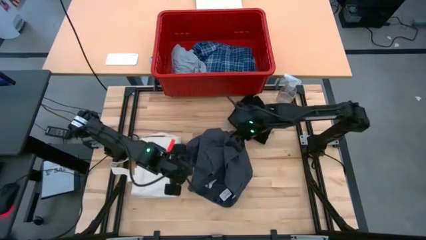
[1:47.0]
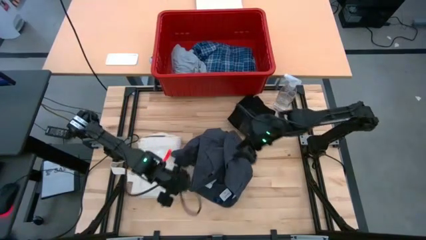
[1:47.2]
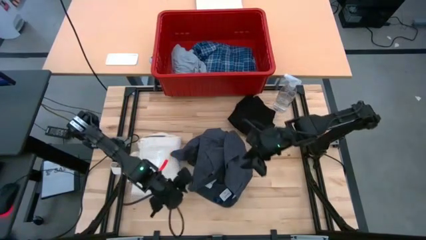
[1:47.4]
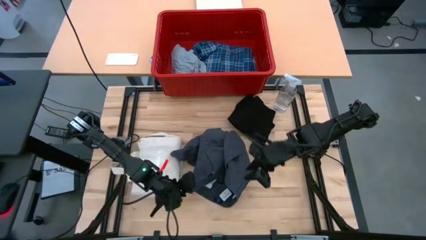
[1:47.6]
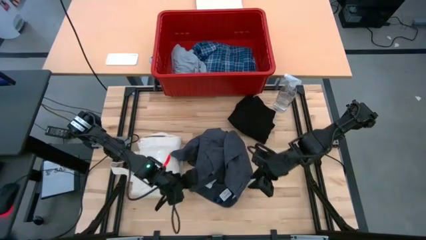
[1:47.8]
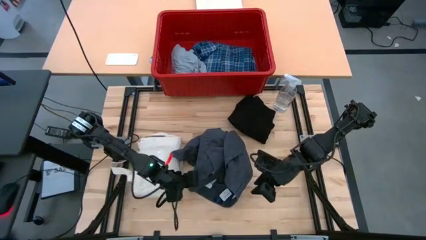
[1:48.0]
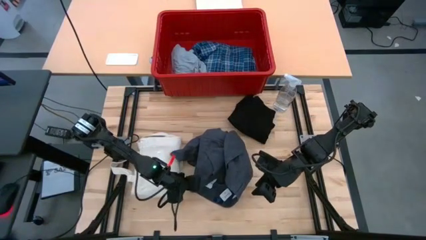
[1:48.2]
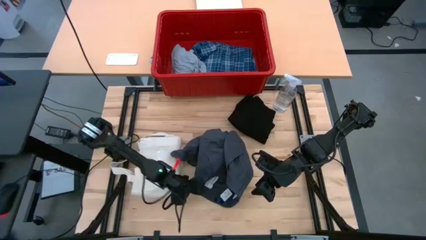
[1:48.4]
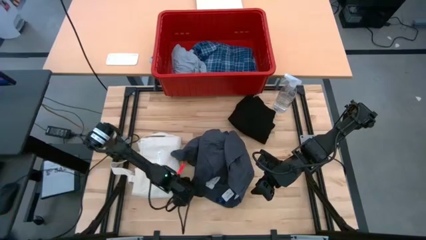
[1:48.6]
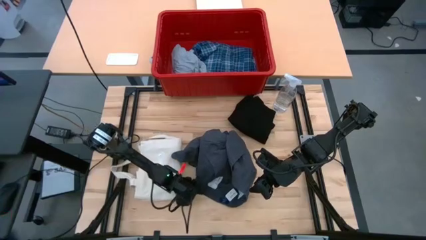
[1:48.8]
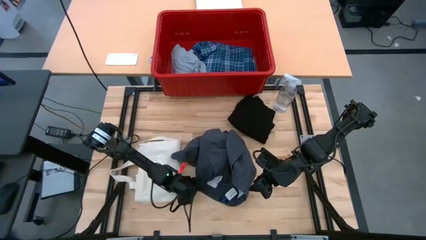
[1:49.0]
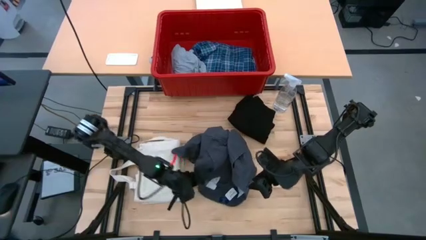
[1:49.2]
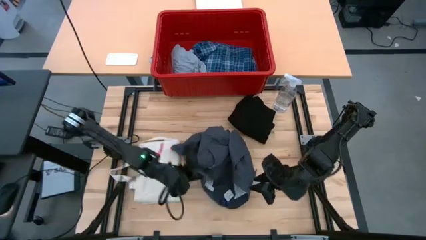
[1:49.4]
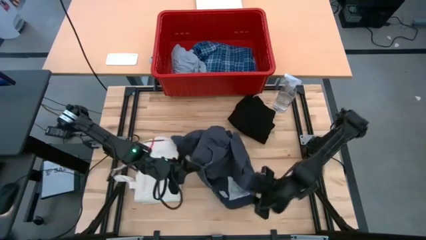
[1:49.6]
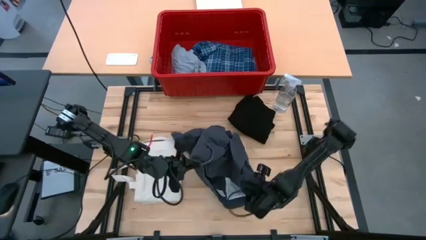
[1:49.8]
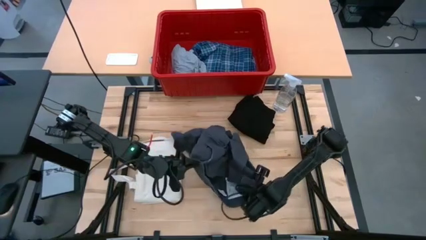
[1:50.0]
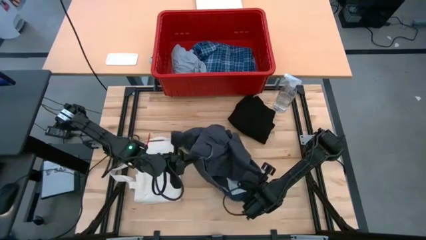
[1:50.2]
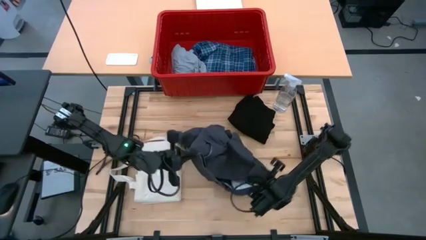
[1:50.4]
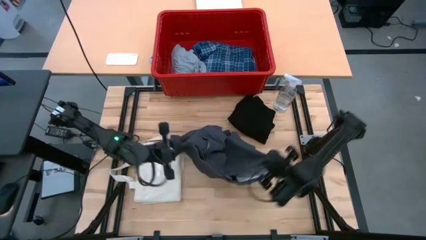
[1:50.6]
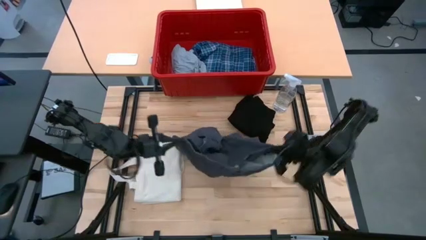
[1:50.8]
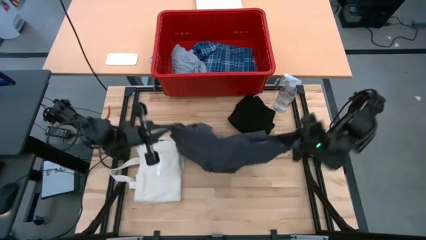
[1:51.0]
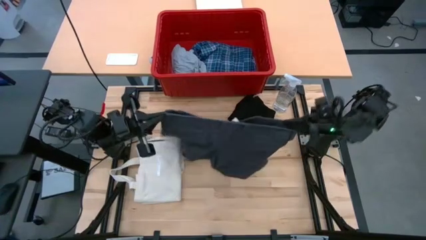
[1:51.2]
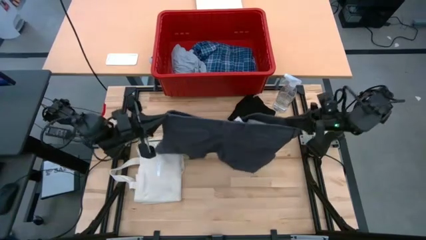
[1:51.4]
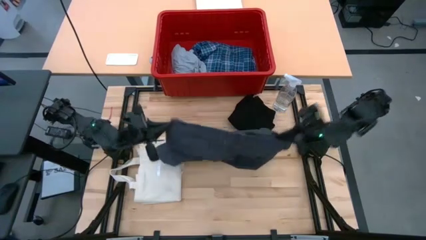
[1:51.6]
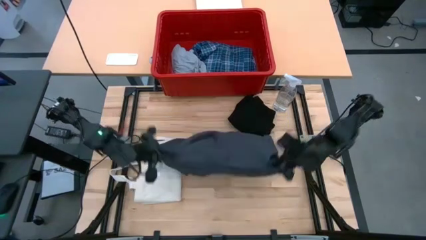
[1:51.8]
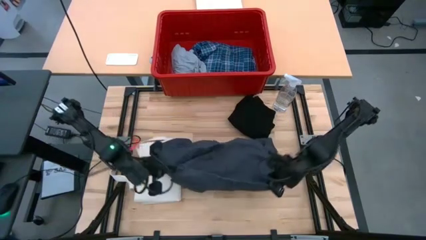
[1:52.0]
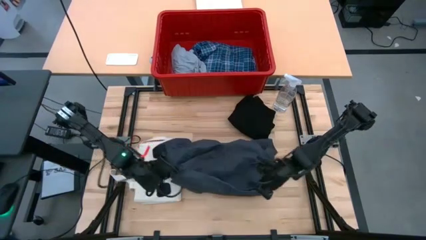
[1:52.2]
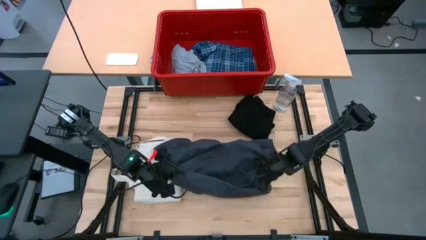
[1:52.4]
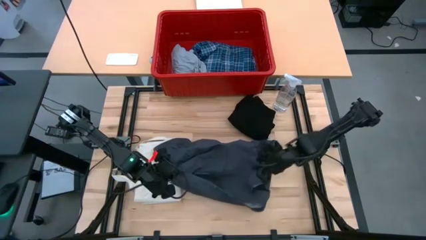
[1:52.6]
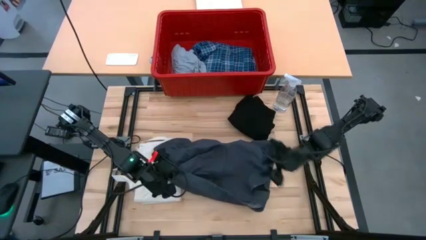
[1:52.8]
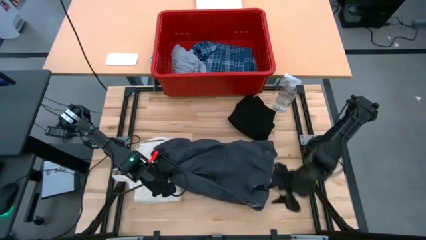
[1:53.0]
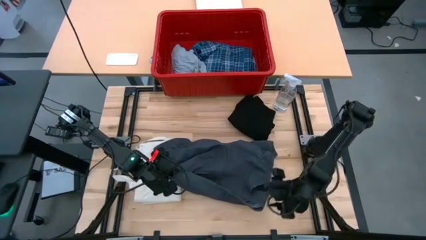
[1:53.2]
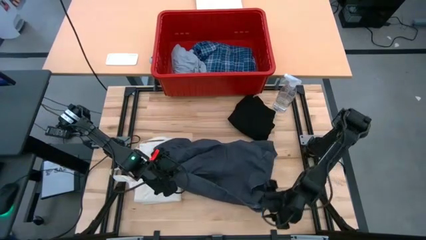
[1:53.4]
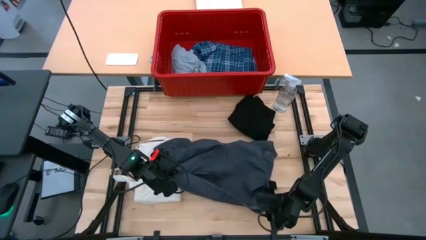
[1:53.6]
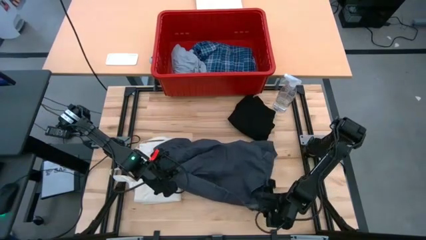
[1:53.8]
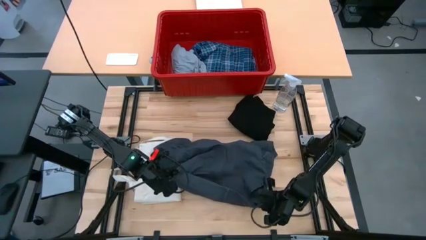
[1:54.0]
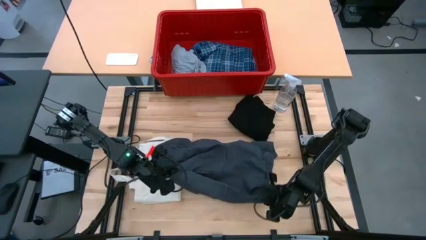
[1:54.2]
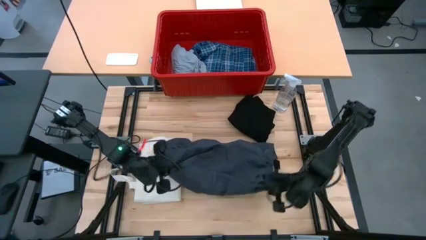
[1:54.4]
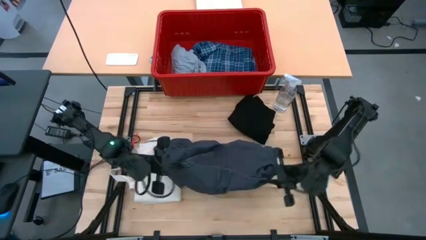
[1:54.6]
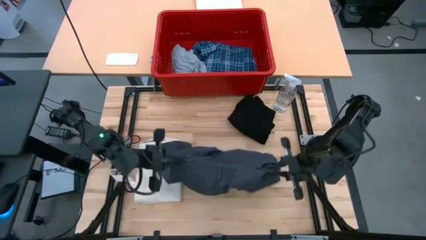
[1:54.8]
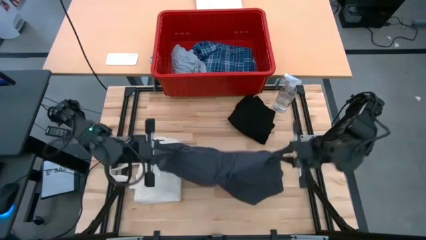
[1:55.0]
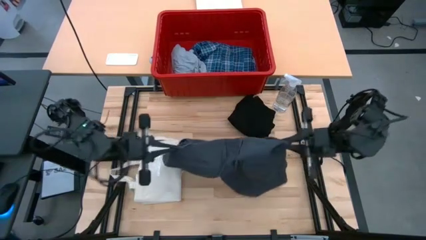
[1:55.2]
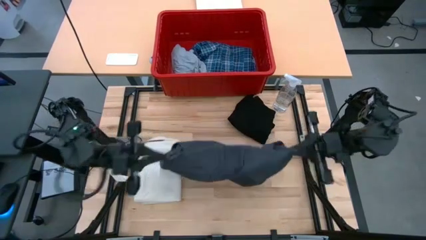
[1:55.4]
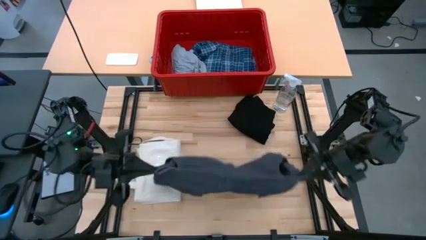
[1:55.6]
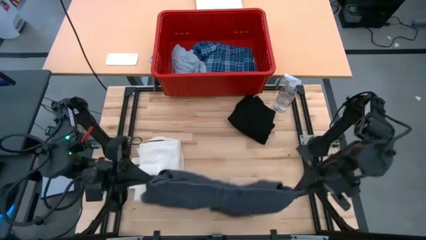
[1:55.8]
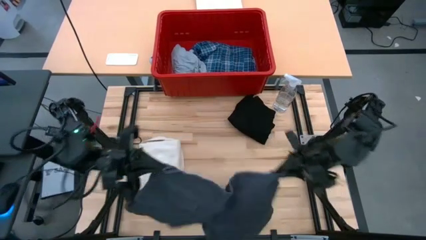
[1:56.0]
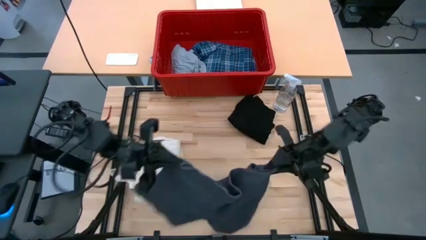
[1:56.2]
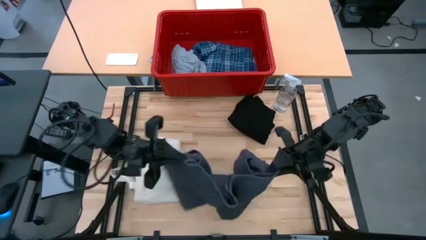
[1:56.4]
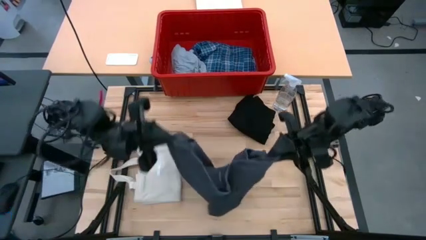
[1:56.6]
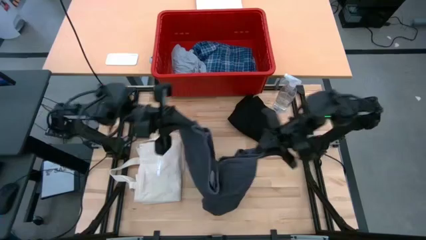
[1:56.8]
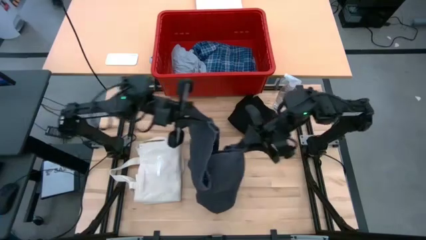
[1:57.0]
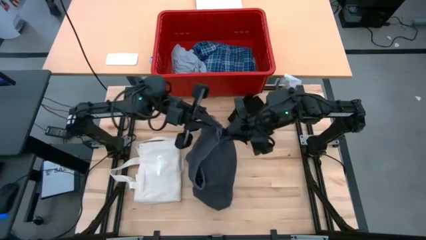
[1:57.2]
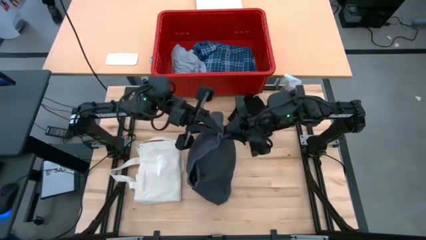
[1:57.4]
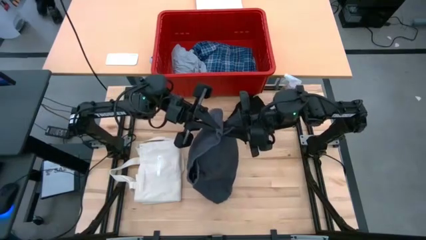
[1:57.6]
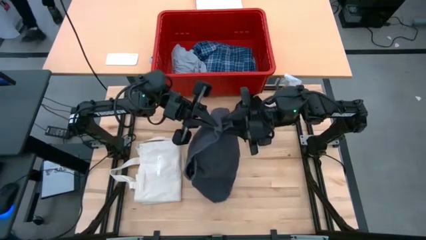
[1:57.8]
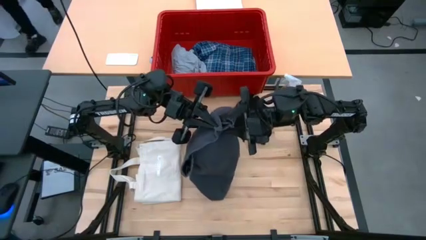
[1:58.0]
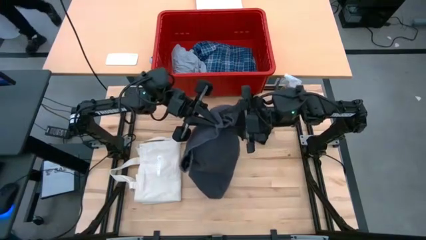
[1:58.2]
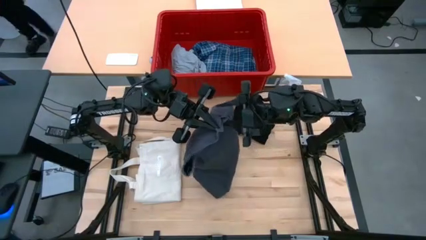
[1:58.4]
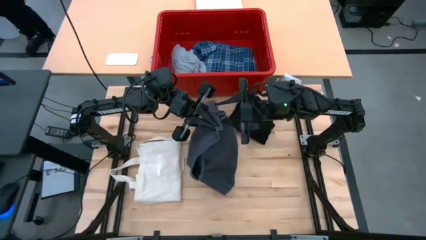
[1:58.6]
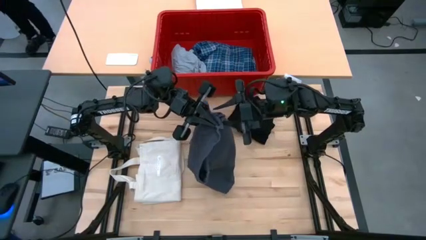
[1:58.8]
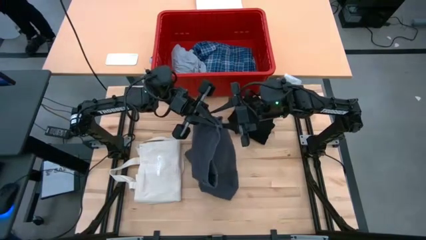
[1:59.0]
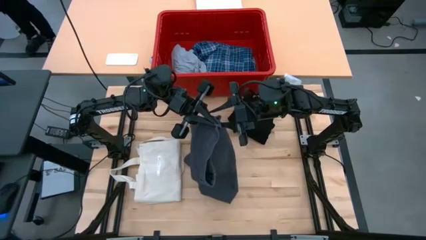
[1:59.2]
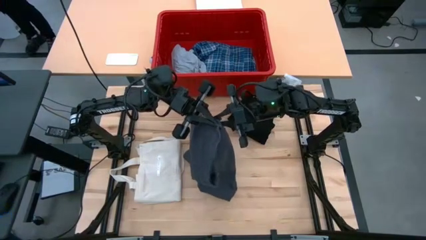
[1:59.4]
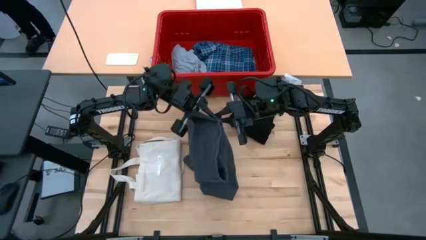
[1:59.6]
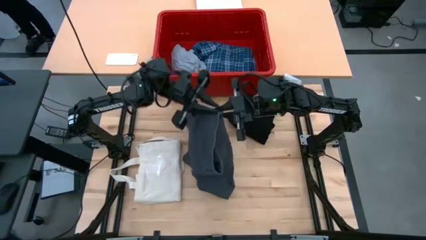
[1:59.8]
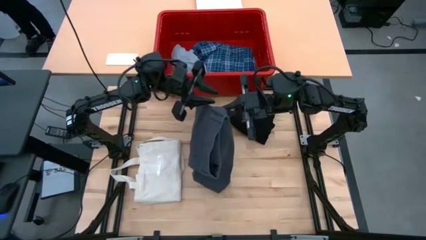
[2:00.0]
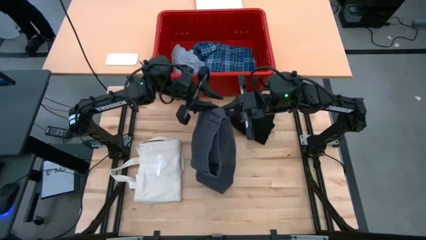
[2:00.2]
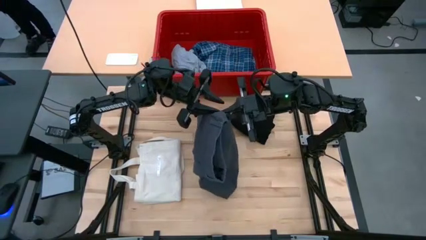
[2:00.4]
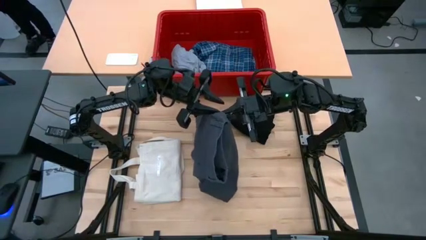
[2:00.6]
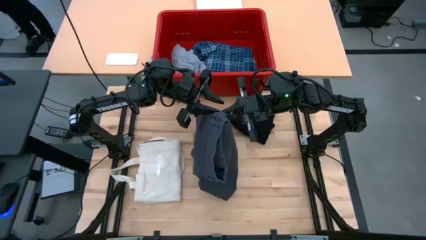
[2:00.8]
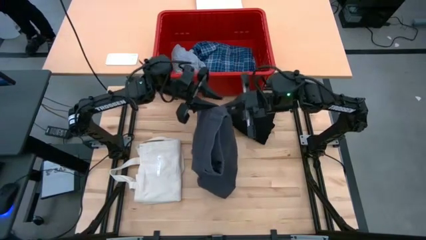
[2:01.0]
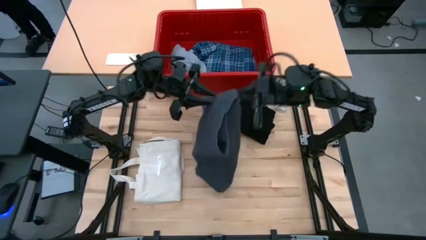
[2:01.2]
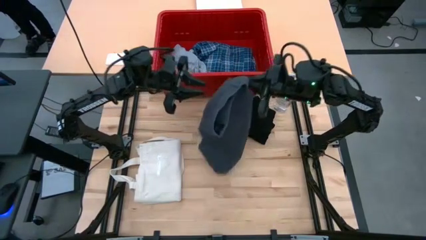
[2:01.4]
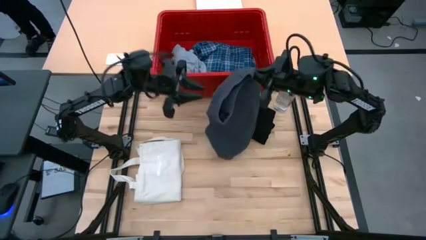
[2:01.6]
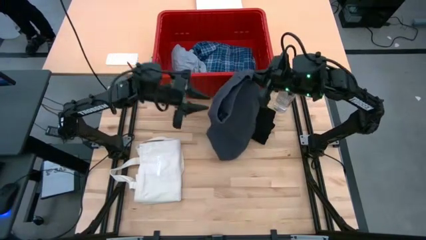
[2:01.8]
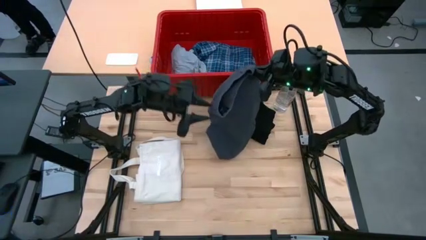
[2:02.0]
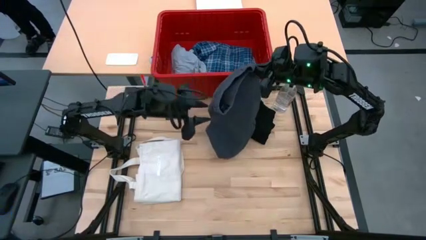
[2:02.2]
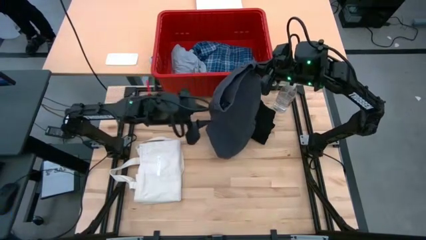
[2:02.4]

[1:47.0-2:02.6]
Task: Fold Laundry from Bin
Fold the gray shorts

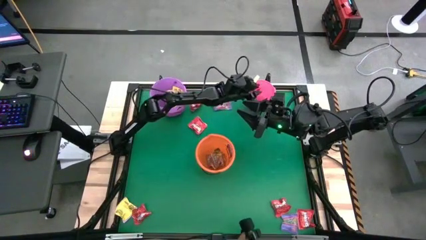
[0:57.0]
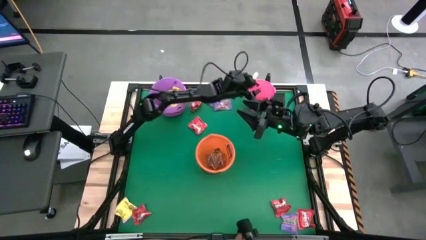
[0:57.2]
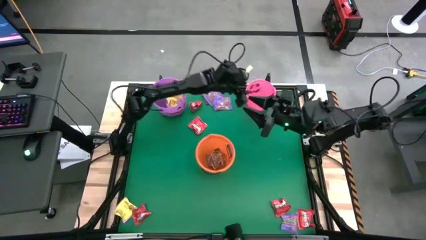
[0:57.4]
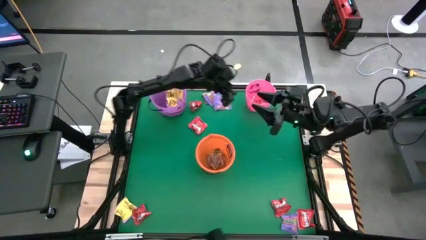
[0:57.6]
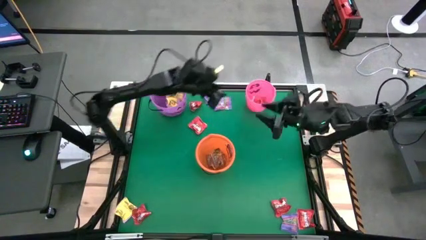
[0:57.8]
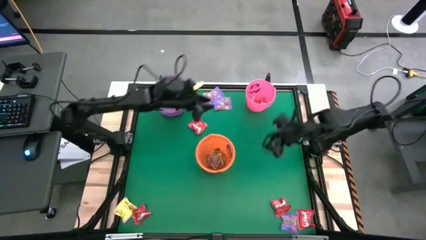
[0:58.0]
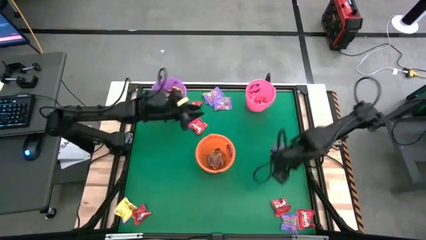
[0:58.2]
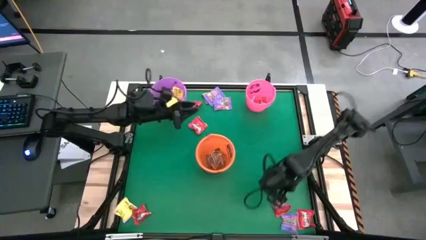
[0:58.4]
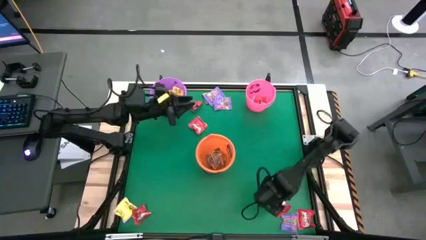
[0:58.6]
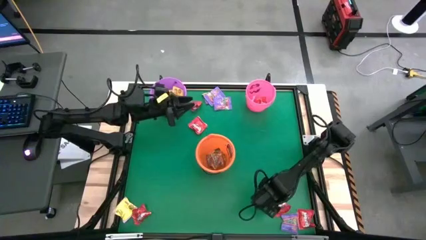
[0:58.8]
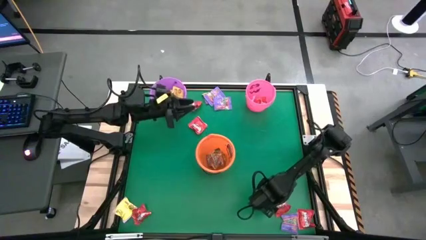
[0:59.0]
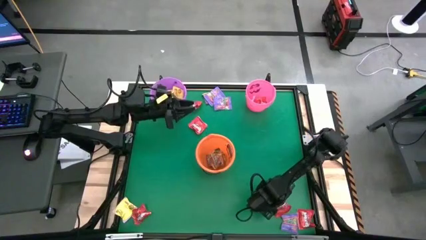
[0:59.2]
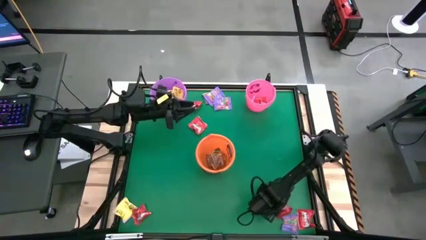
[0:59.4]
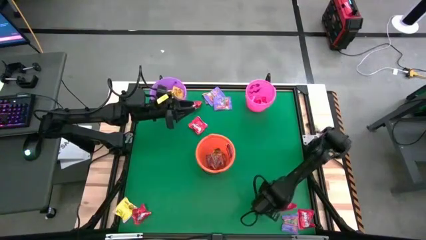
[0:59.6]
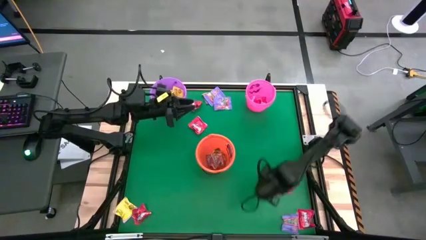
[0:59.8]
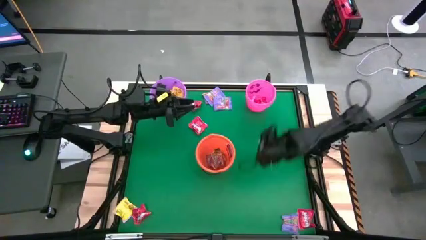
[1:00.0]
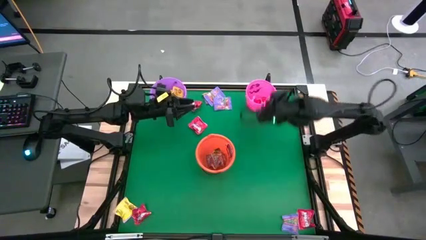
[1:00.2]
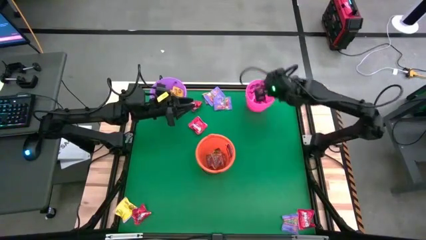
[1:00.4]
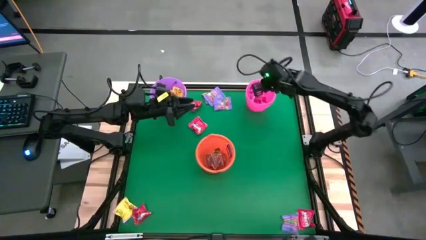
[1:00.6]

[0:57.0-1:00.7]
Task: Sort candy by brand, put in halloween buckets
Put the red candy into the pink bucket
